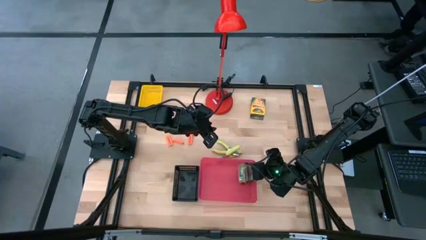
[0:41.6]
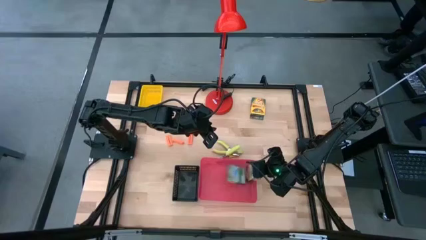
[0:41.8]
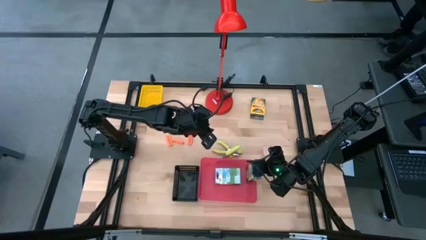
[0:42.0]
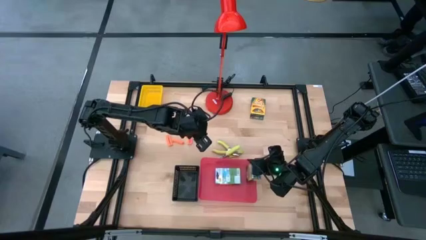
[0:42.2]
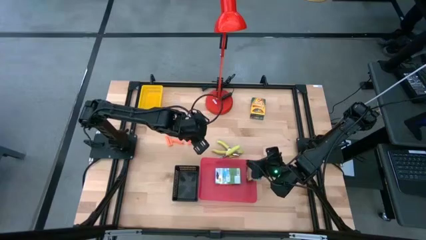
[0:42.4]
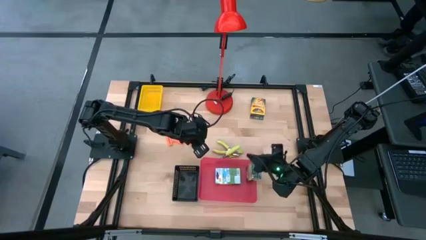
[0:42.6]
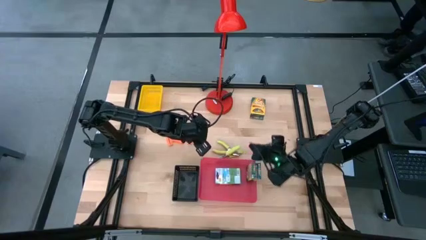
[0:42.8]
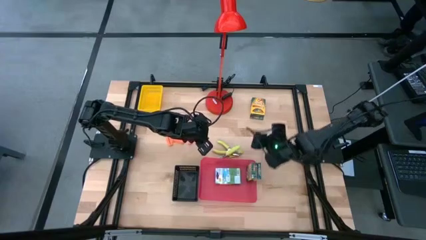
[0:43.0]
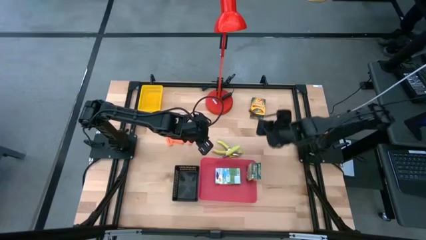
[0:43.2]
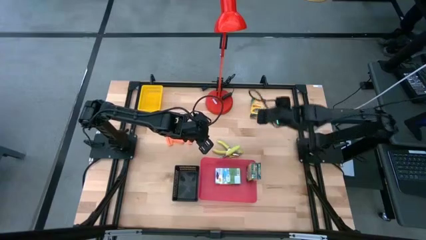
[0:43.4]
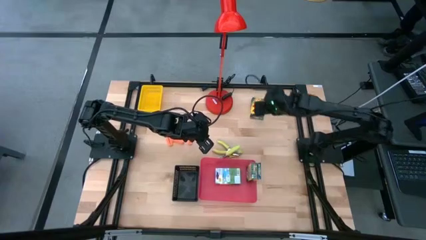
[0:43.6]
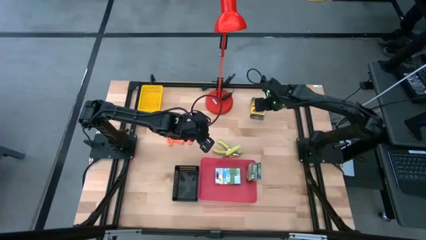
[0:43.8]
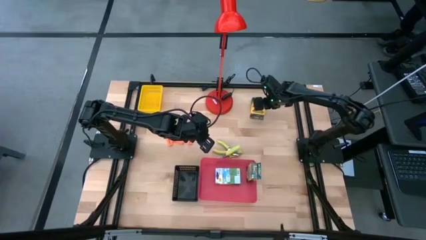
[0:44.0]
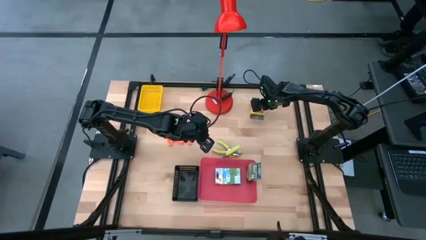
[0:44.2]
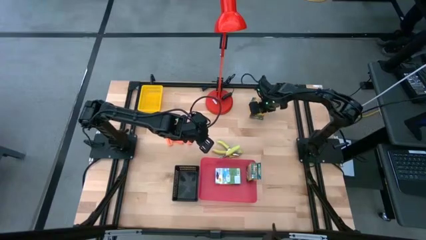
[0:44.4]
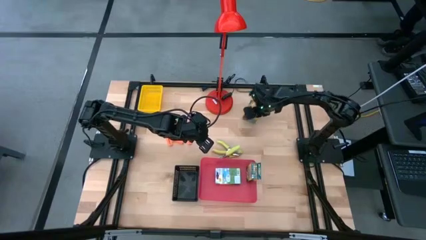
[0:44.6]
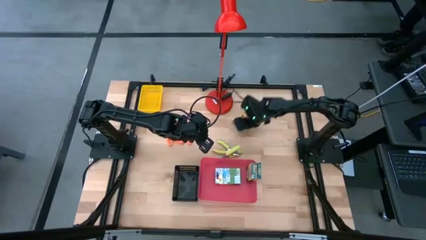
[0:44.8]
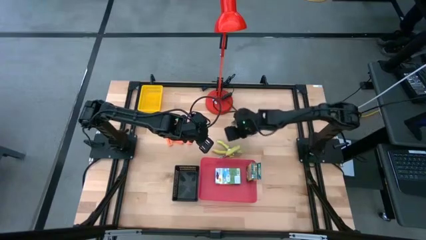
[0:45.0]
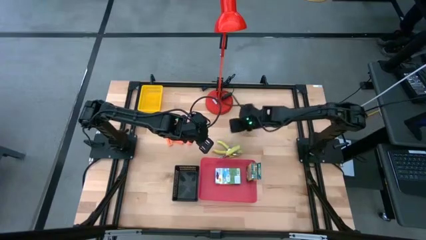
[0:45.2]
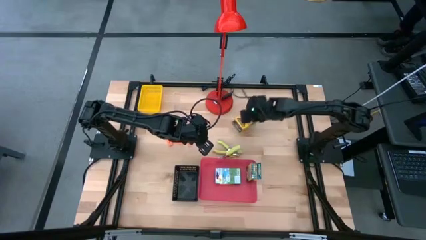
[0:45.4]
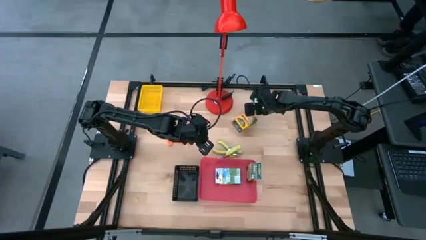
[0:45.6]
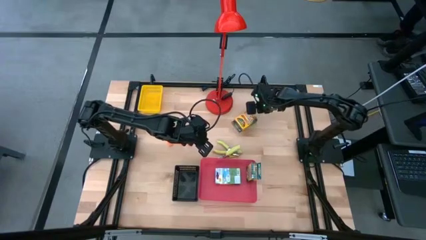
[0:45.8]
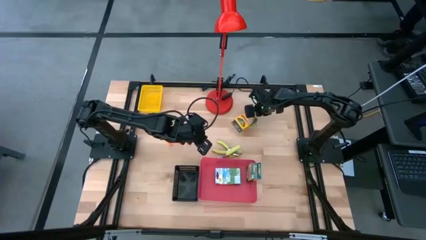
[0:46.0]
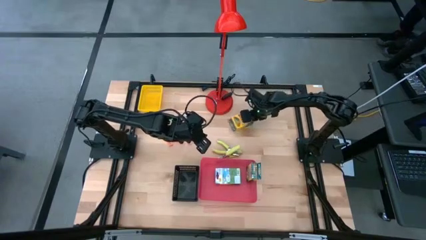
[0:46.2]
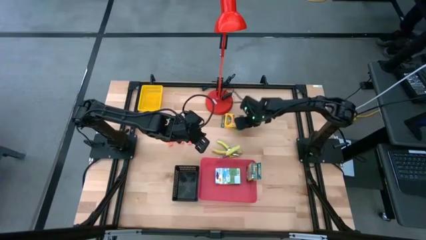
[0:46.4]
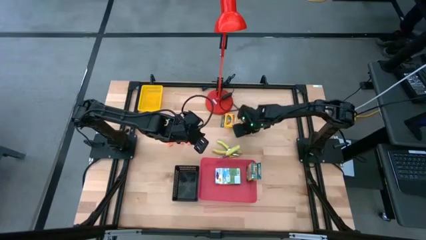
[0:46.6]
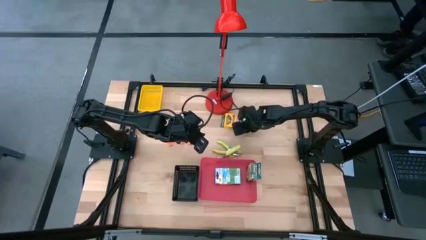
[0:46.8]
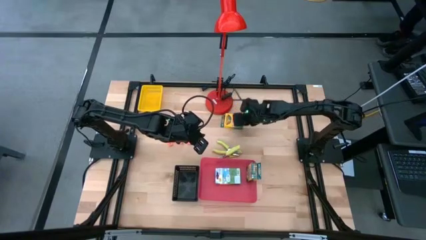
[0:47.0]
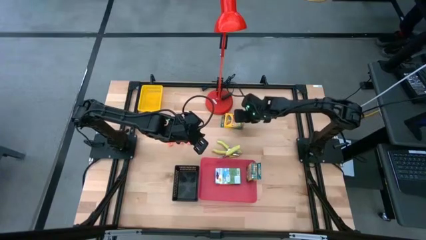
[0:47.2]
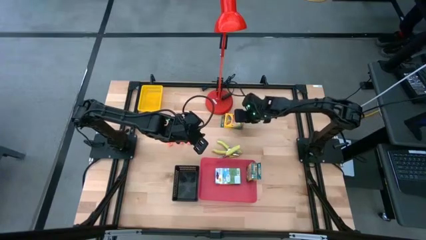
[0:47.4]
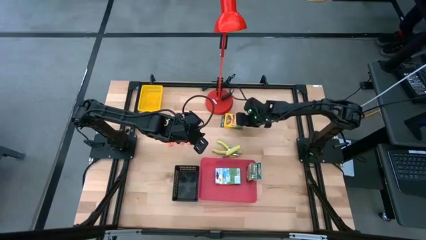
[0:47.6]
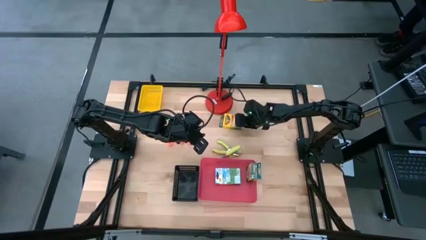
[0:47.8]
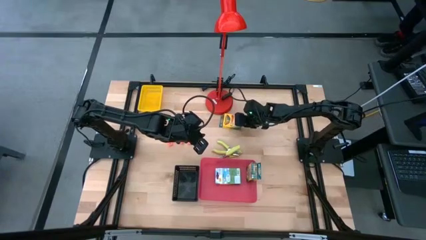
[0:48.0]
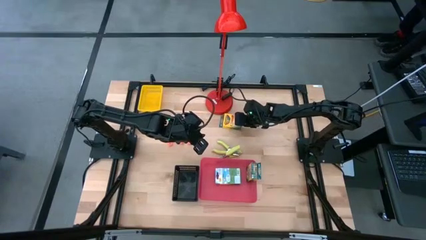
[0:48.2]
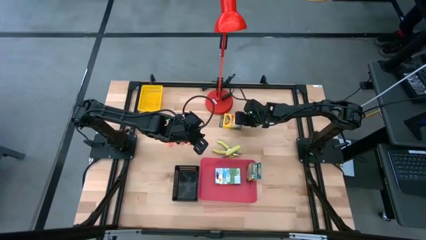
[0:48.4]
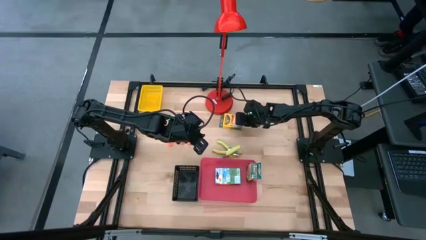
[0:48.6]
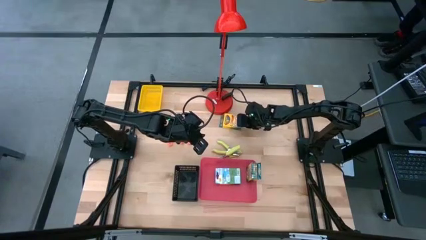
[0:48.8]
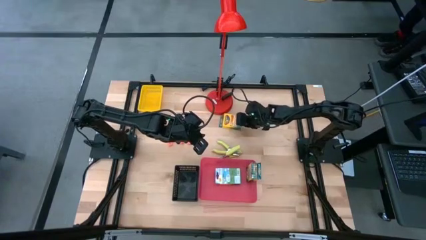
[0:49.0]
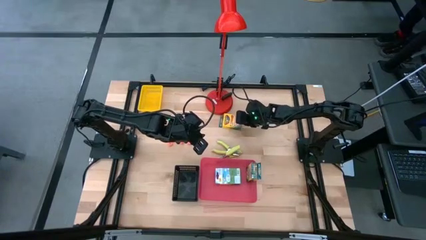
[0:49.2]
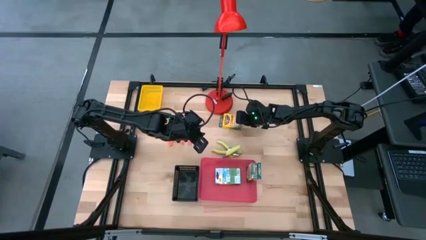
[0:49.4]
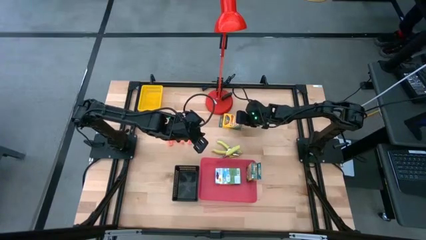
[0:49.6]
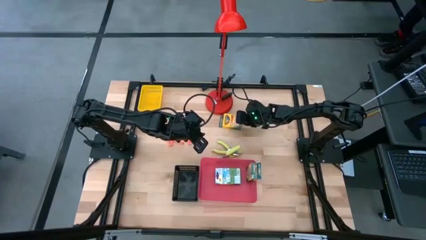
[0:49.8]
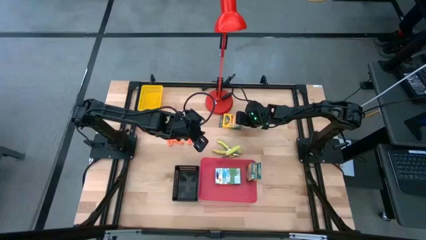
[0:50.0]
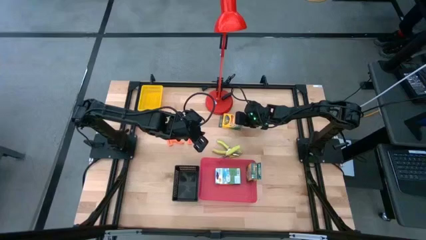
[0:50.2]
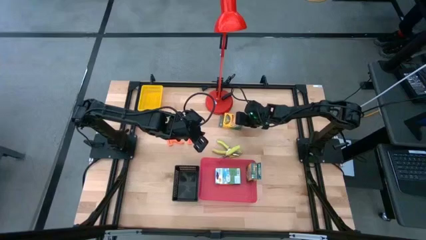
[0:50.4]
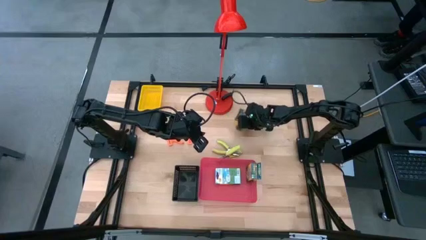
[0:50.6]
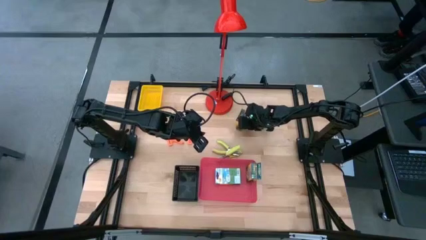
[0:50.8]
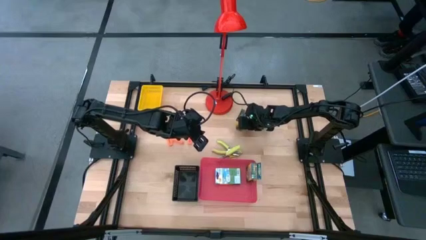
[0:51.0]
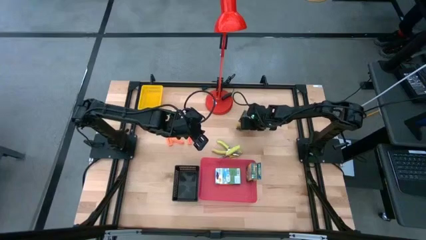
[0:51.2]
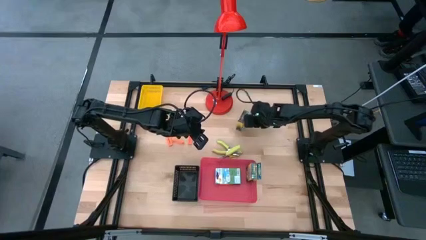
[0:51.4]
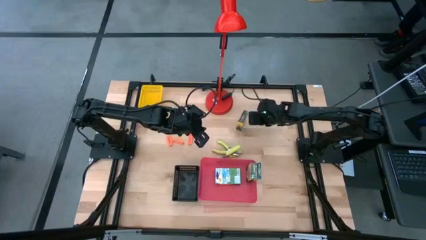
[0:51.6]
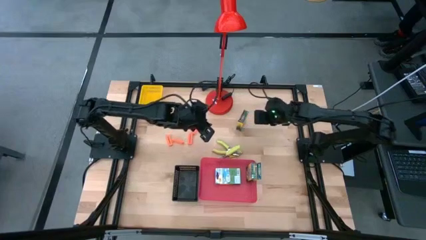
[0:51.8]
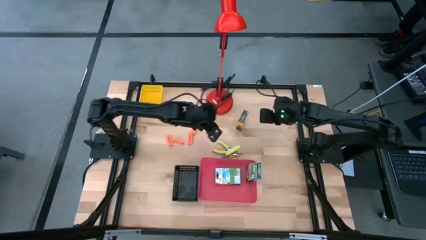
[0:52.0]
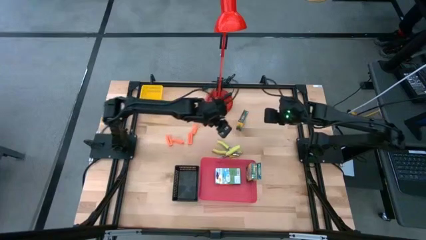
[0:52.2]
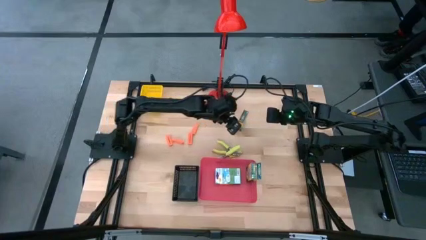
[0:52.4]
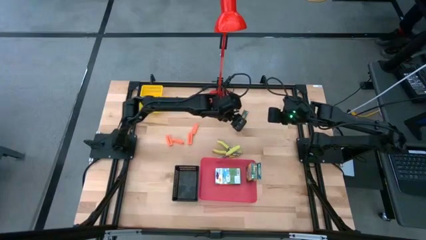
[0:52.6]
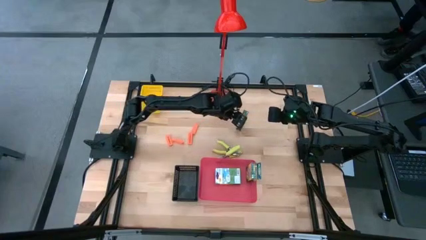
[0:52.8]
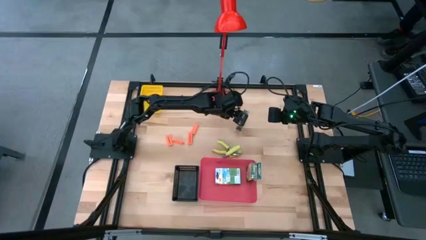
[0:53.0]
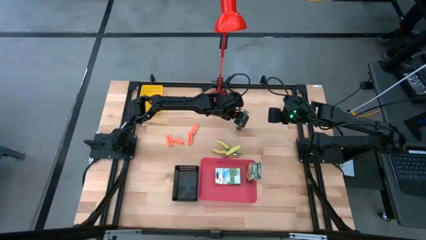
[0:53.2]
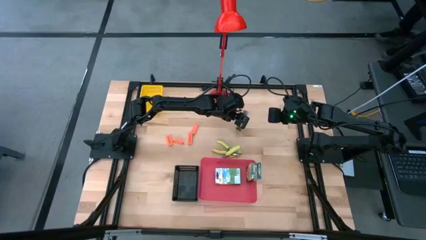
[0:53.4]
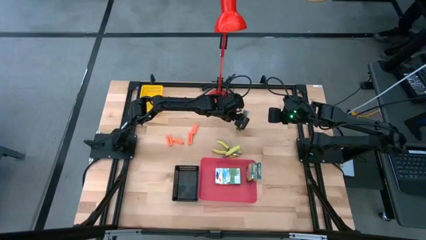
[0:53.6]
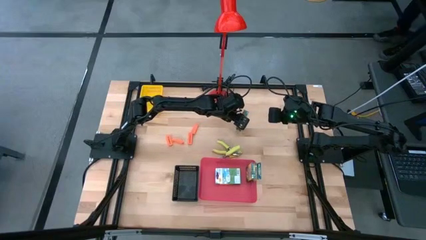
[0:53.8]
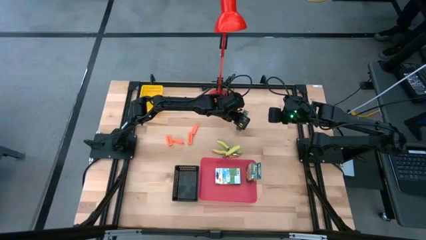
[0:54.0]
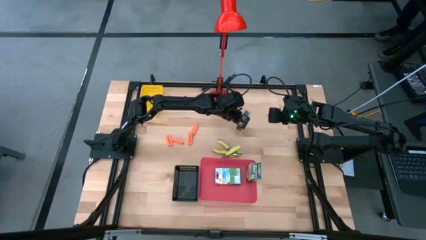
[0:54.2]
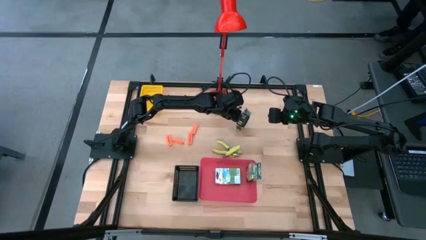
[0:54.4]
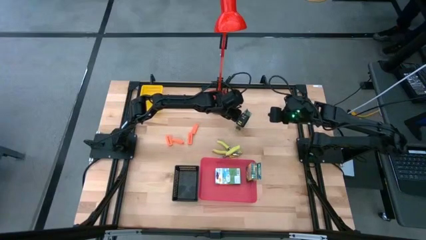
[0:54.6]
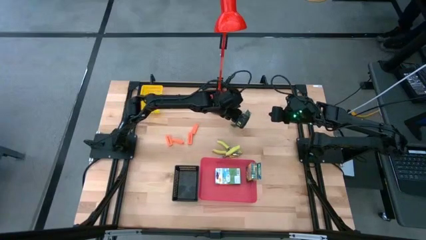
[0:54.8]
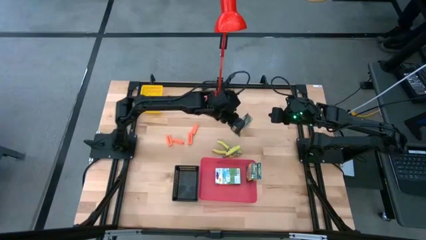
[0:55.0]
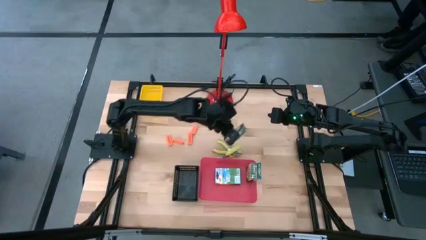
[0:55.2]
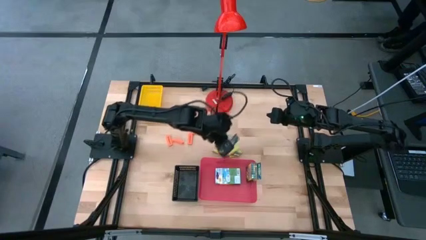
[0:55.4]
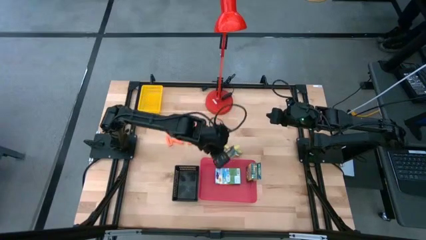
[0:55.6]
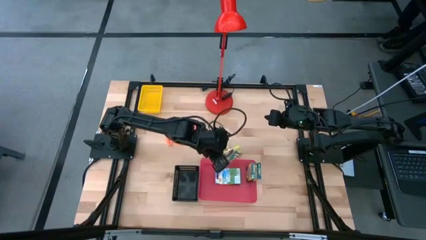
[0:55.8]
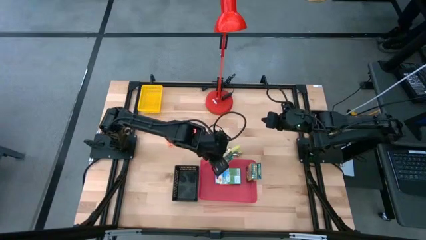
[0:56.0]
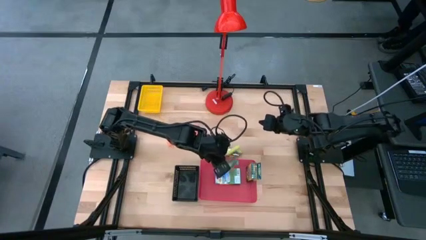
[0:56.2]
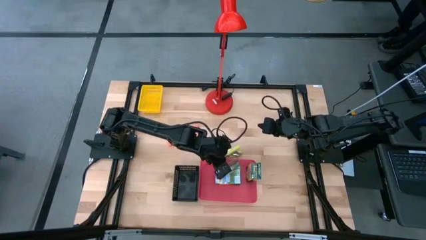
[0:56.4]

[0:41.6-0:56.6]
Task: Pick & Place School Supplies
Put the yellow crayon box into the red bin
